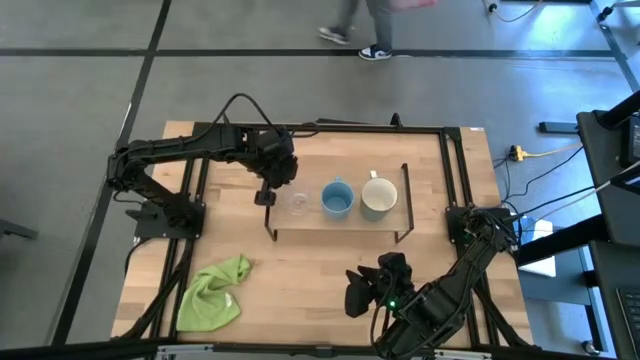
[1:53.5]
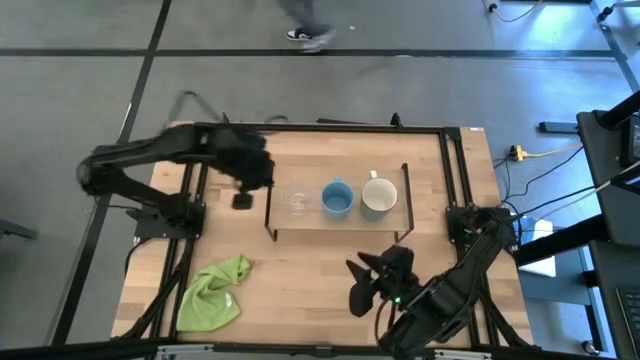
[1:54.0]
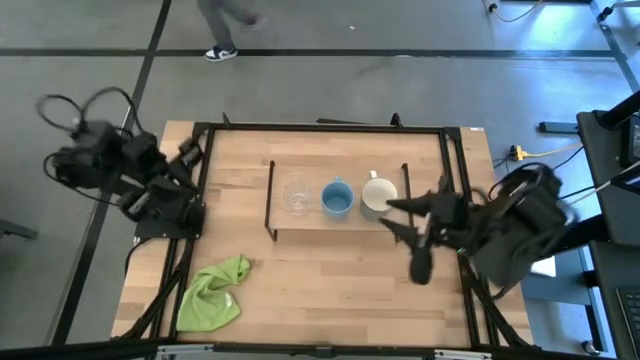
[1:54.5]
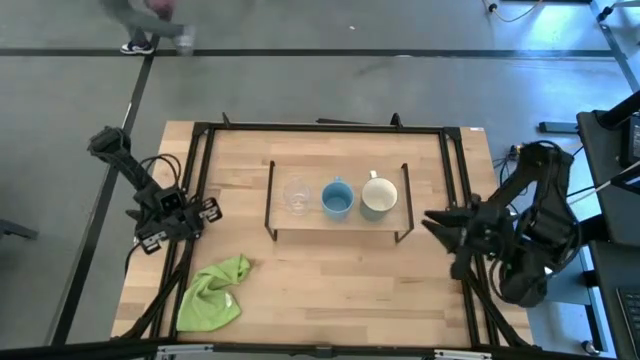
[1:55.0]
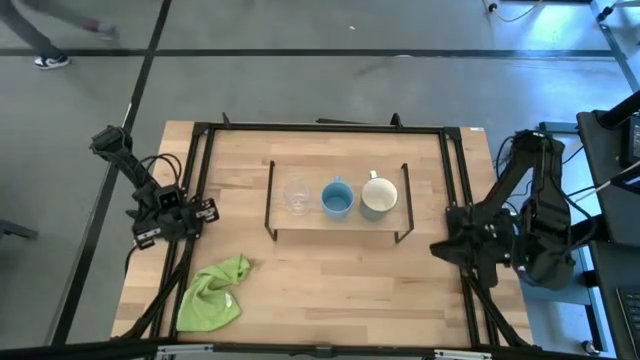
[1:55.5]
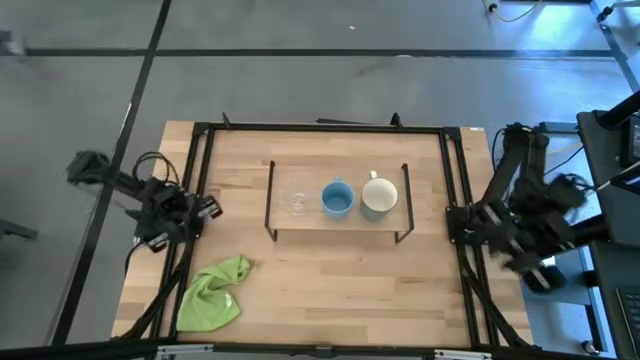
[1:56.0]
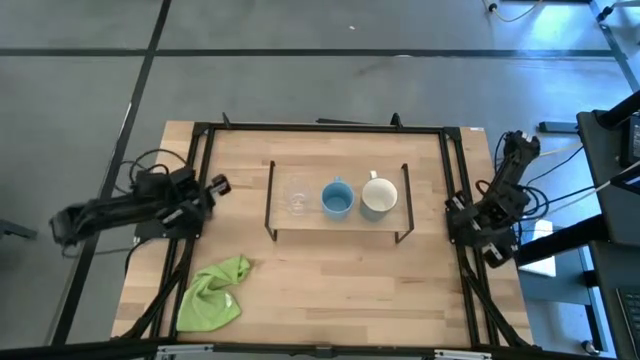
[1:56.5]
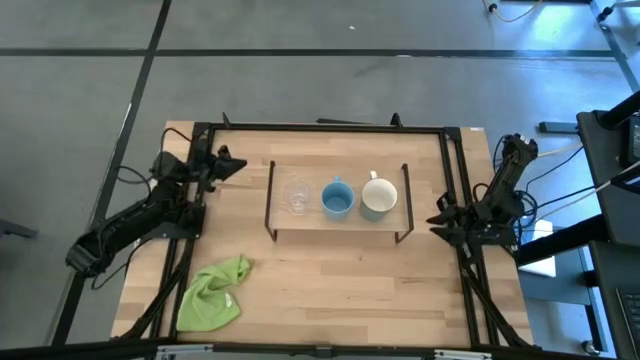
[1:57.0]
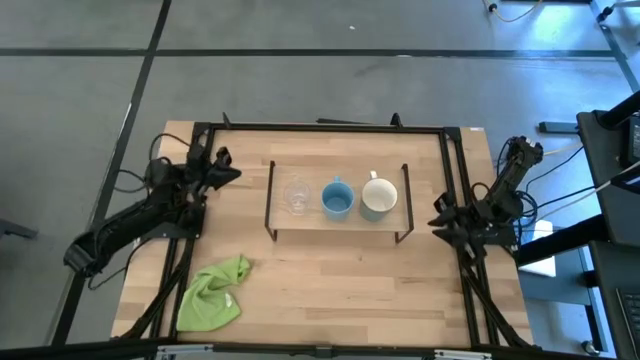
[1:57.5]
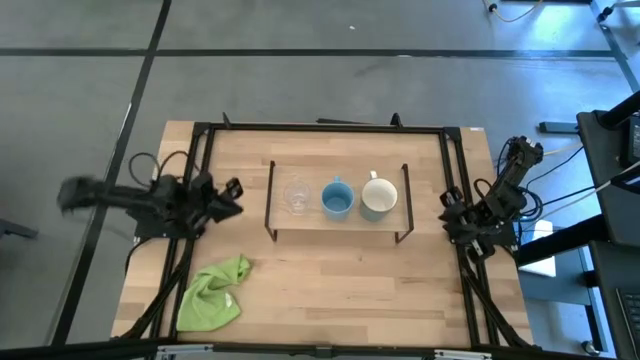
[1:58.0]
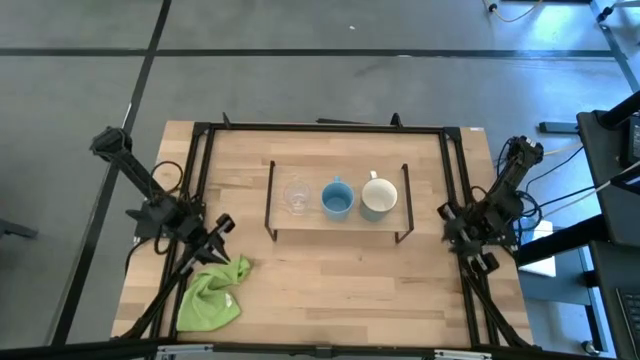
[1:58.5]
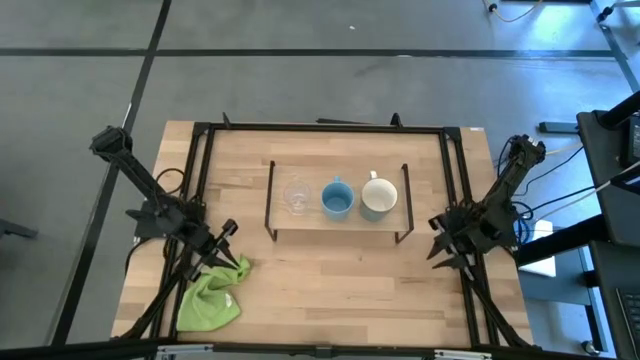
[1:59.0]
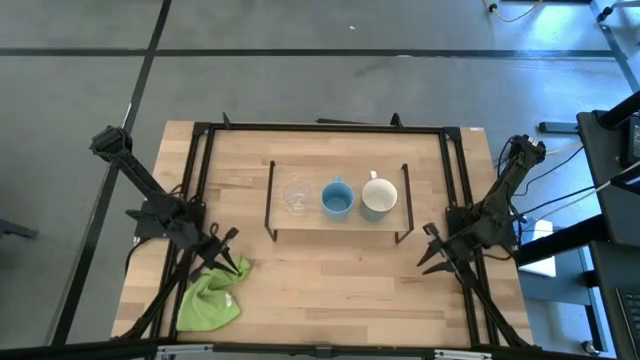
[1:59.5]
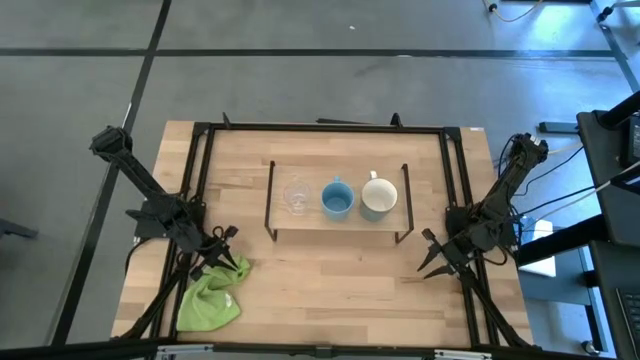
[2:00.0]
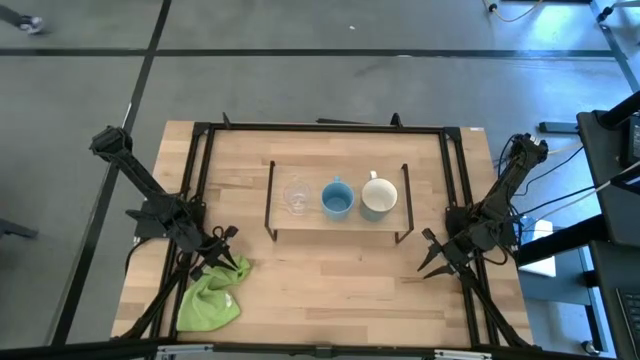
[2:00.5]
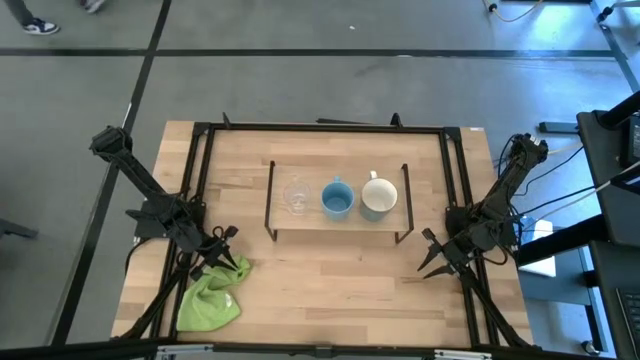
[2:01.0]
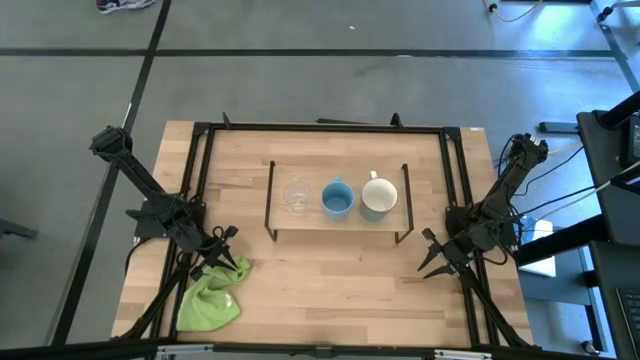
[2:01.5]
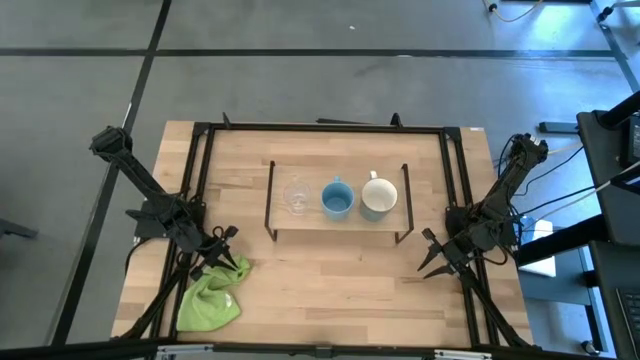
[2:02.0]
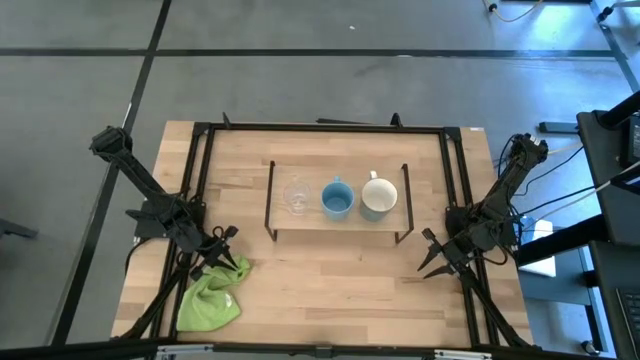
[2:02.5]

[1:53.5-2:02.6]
Task: Stack small to large cups/mugs on shelf
Return to Home Position

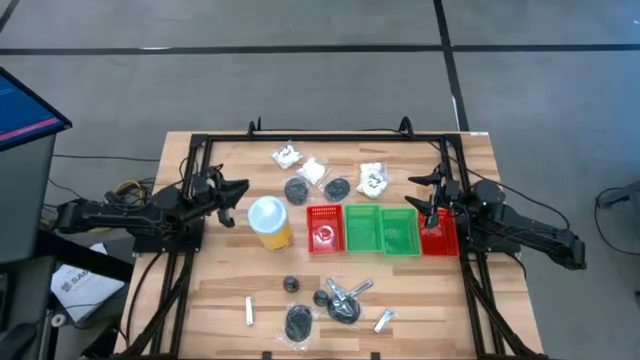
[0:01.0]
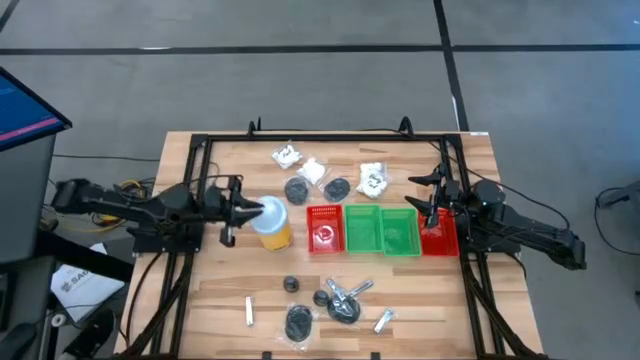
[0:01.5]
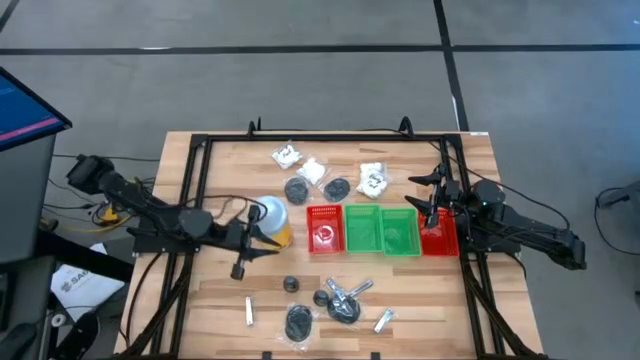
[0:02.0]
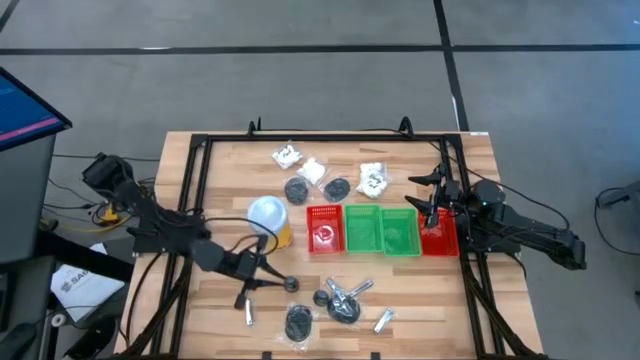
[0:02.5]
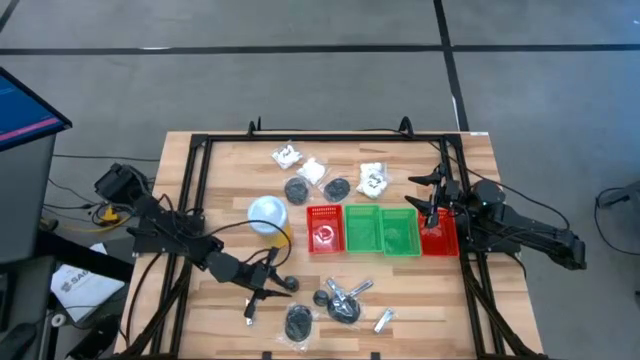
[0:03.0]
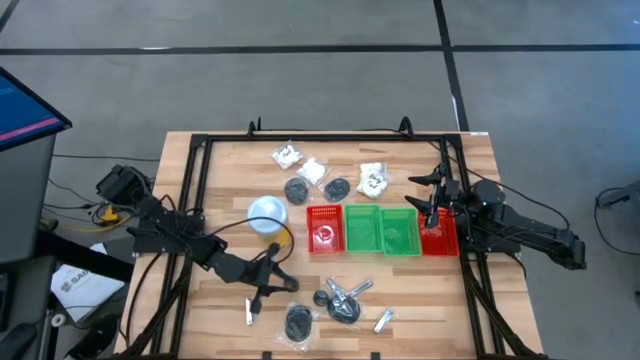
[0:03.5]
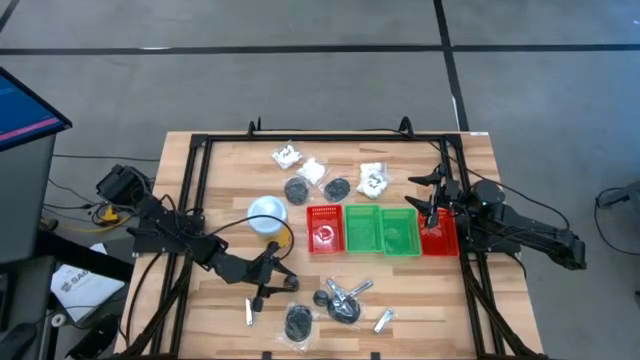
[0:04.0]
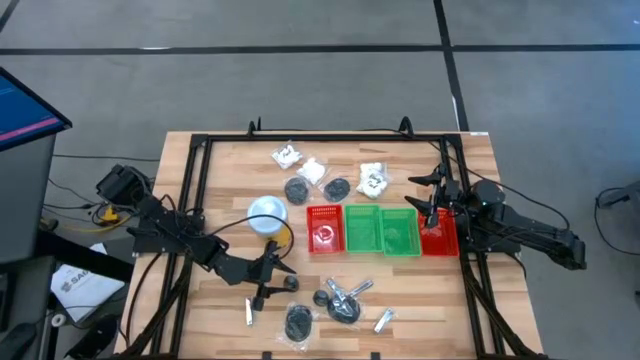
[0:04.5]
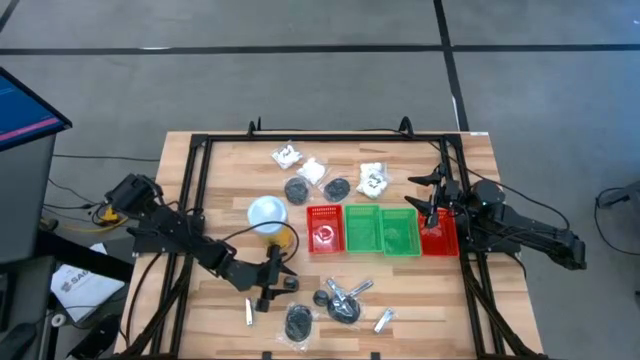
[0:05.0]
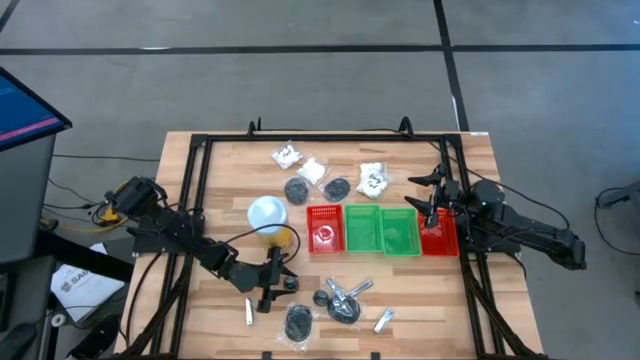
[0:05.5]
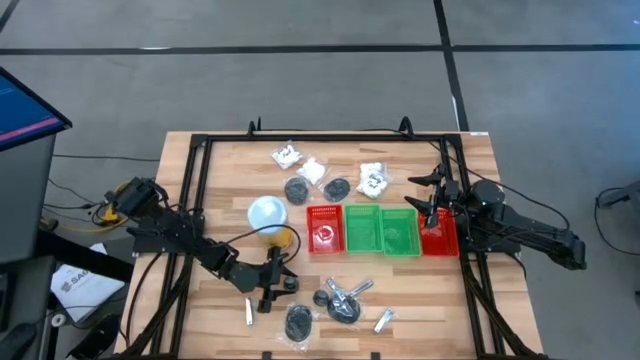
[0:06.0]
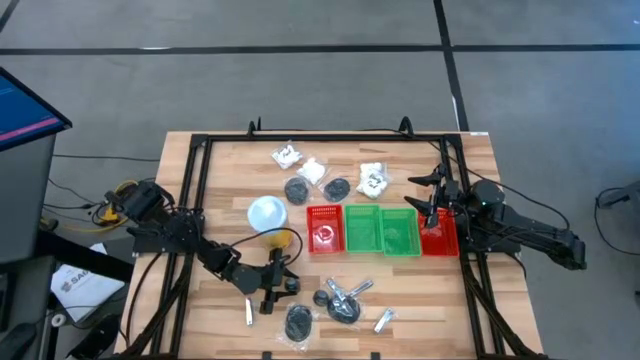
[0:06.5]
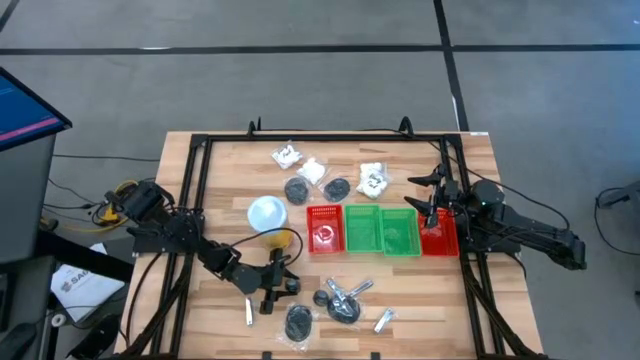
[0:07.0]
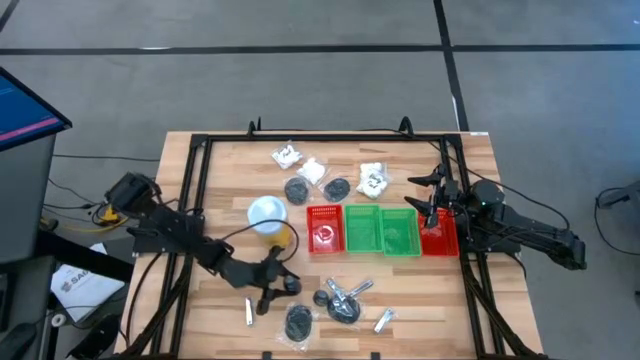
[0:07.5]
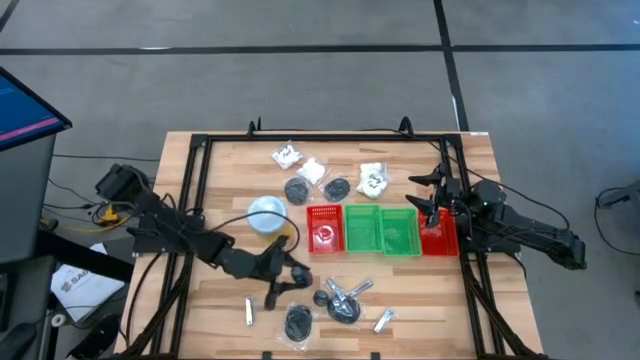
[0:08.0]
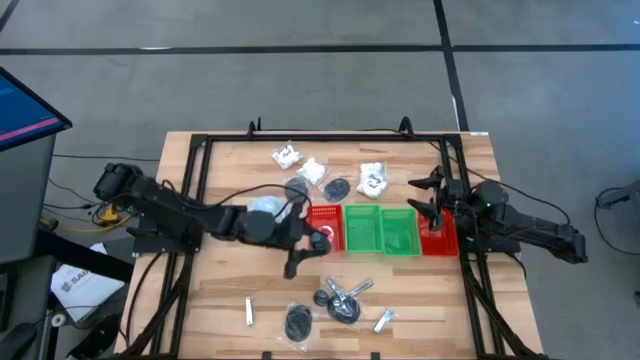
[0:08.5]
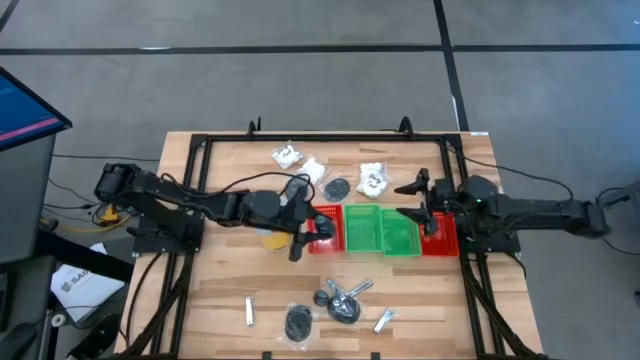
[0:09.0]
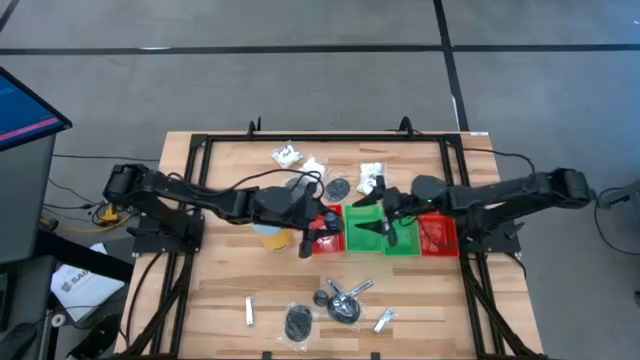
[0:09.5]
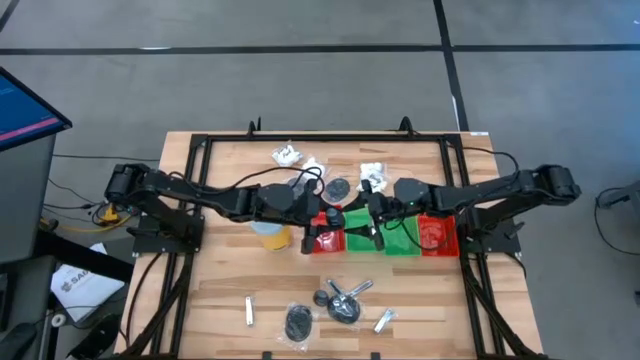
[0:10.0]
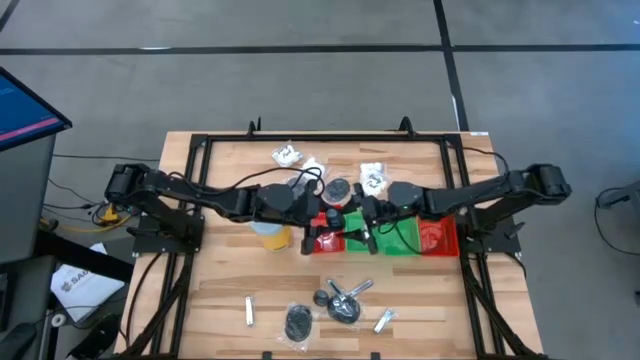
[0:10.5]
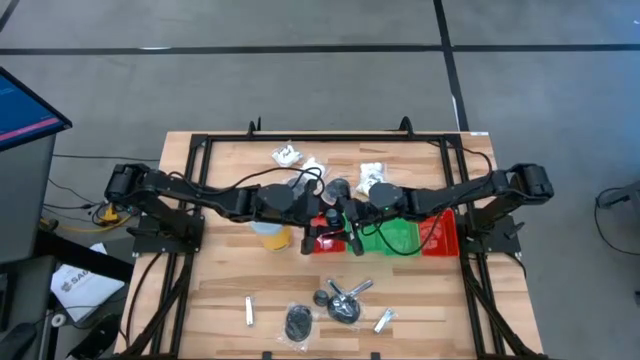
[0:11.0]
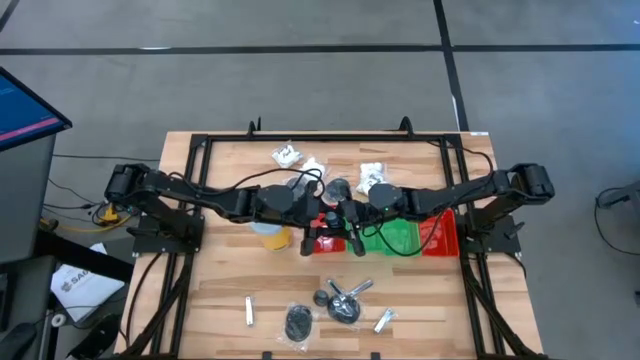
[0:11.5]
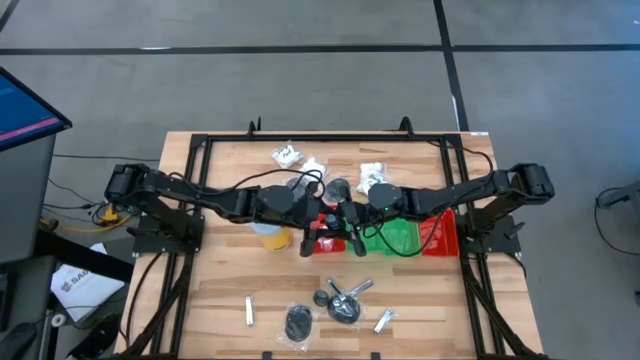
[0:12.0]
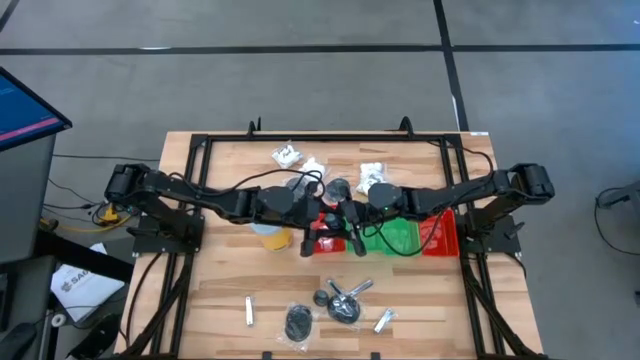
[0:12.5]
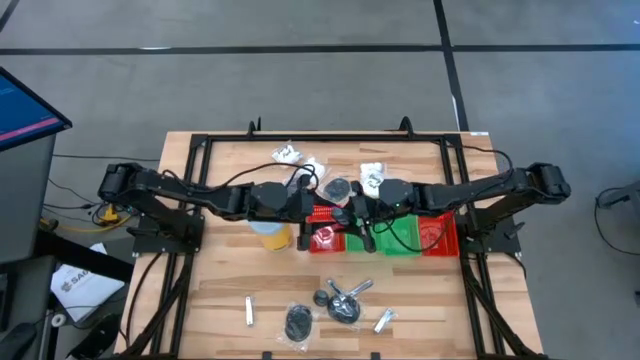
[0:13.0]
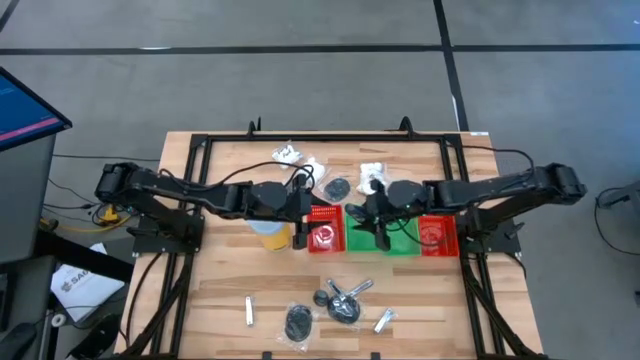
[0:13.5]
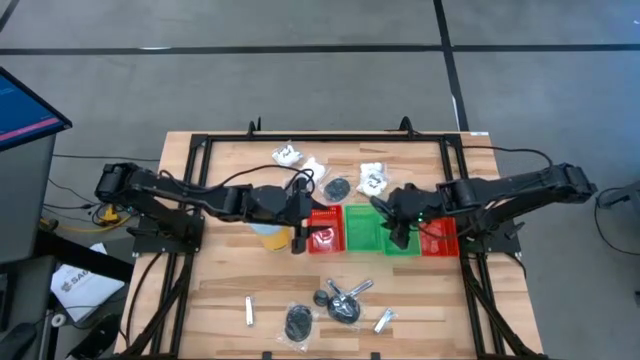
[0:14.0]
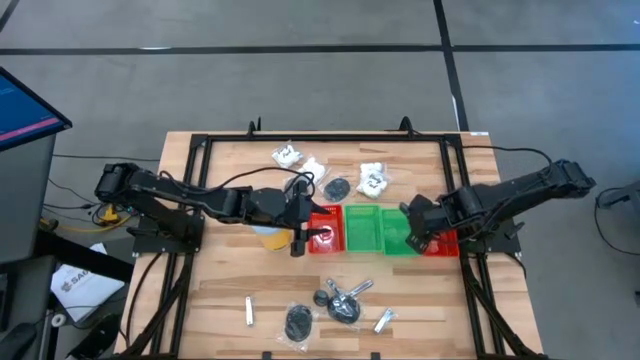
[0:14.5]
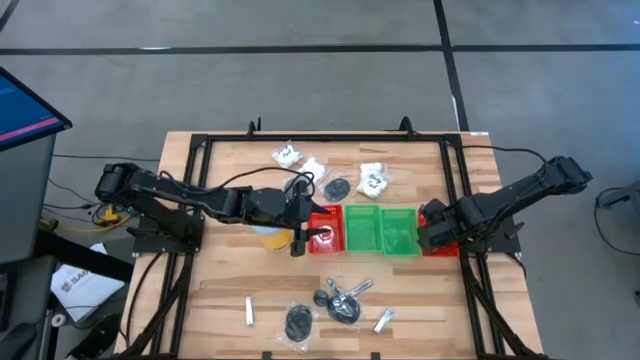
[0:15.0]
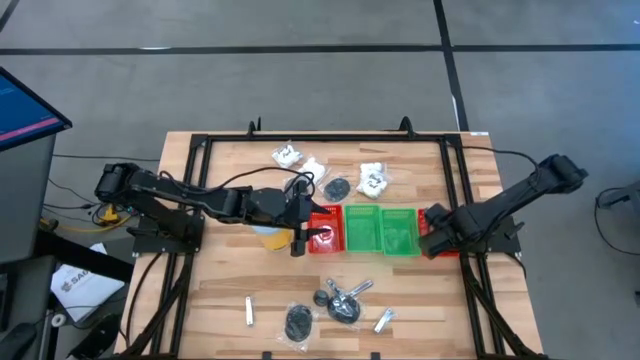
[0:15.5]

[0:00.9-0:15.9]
Task: Pick & Place Travel size toiletries
Put the black deodorant into the right red bin
